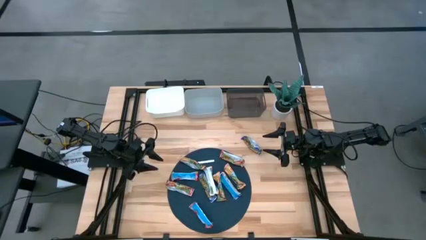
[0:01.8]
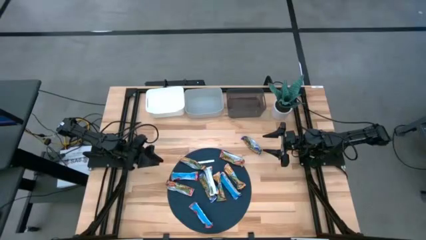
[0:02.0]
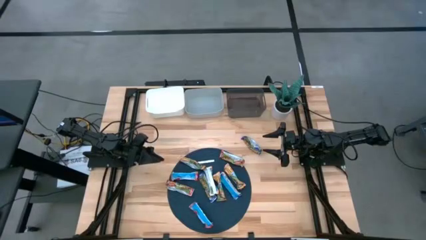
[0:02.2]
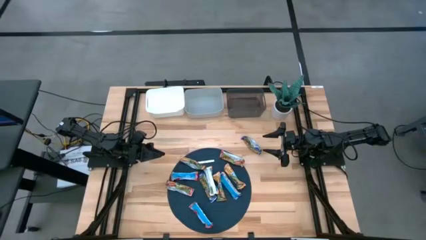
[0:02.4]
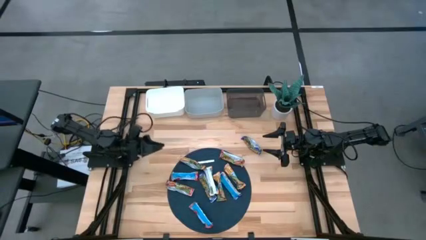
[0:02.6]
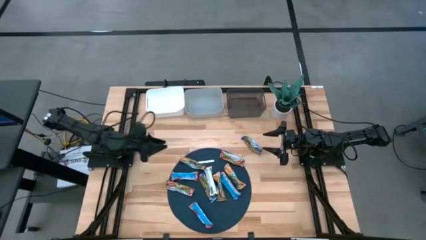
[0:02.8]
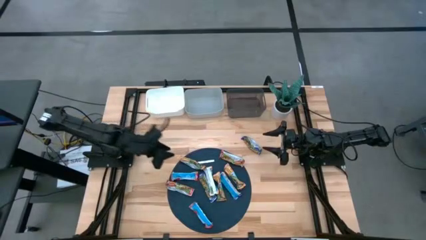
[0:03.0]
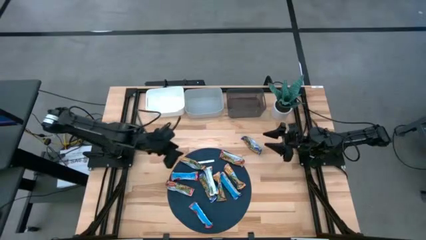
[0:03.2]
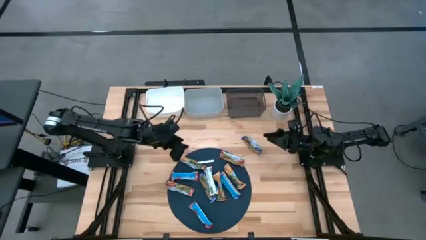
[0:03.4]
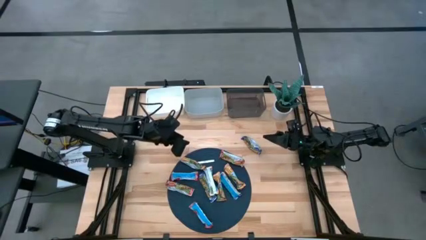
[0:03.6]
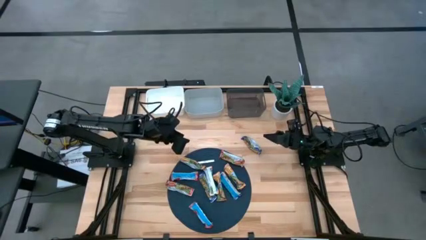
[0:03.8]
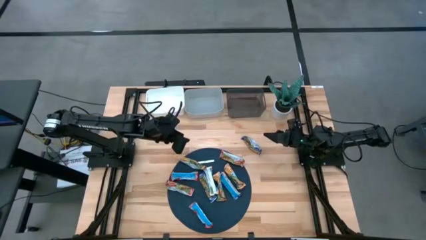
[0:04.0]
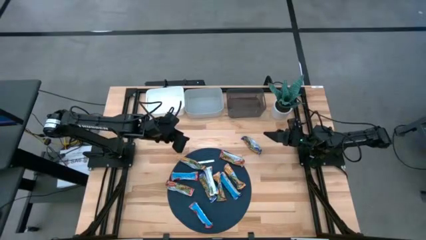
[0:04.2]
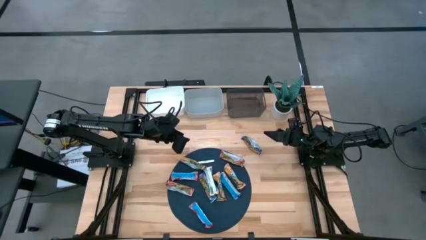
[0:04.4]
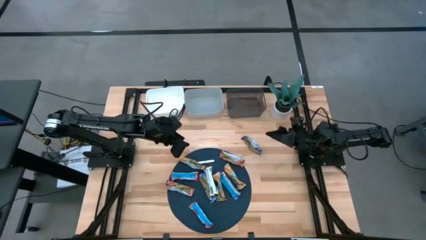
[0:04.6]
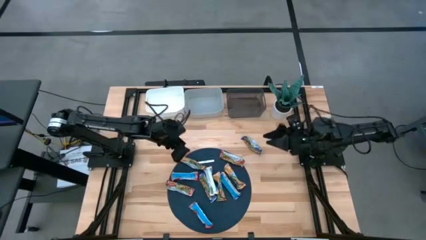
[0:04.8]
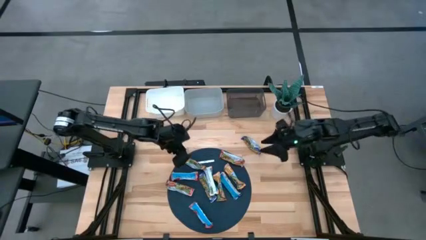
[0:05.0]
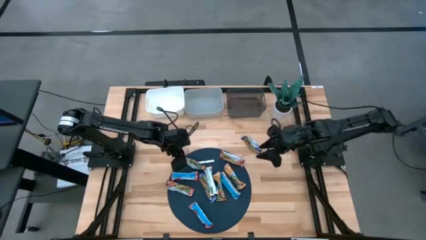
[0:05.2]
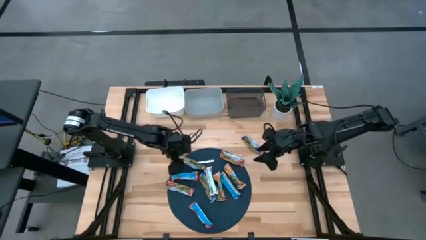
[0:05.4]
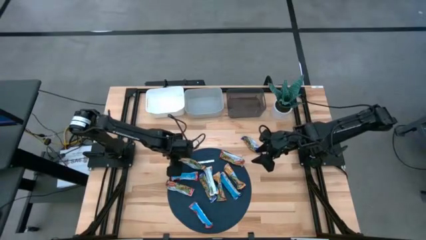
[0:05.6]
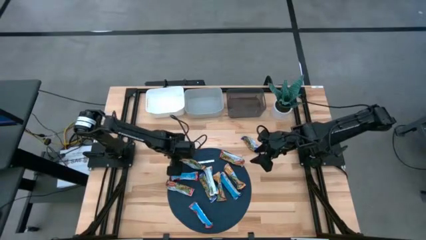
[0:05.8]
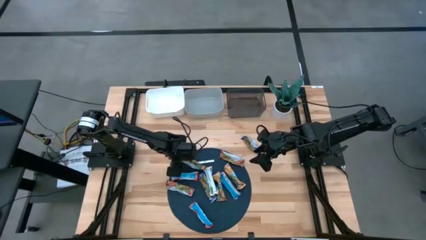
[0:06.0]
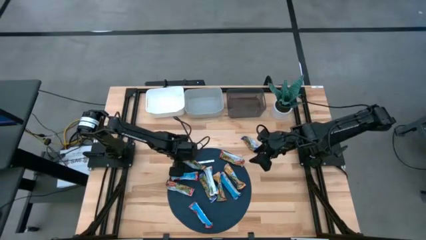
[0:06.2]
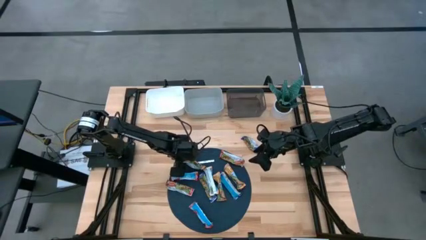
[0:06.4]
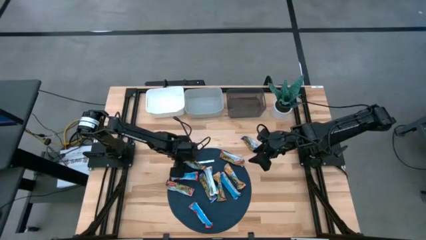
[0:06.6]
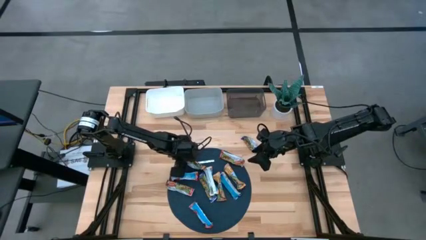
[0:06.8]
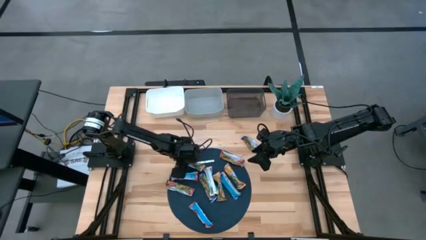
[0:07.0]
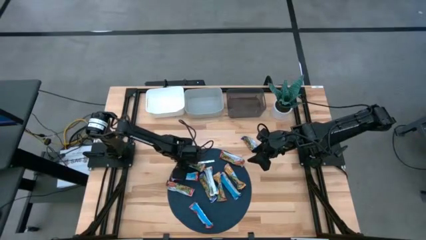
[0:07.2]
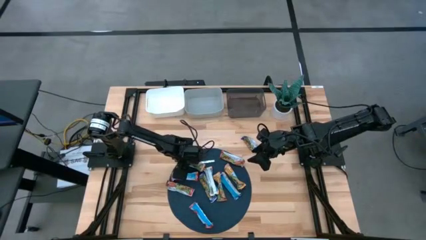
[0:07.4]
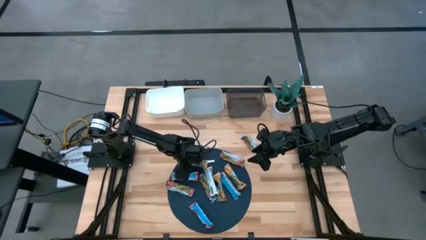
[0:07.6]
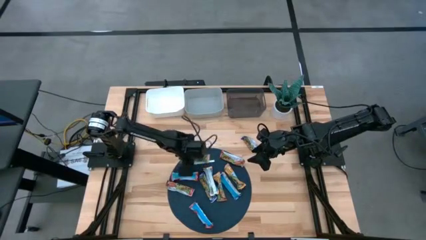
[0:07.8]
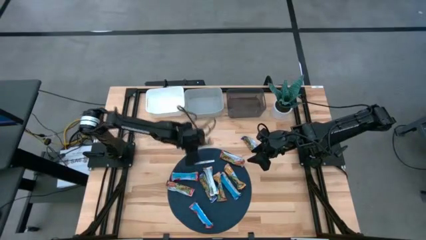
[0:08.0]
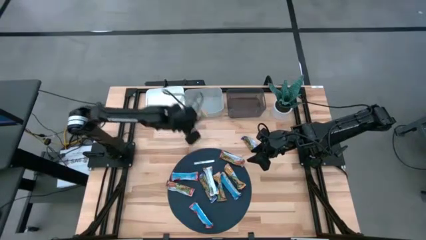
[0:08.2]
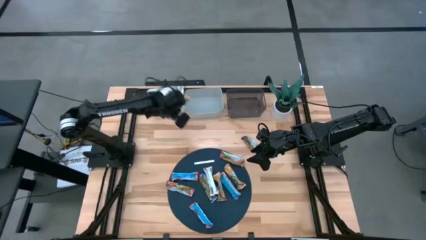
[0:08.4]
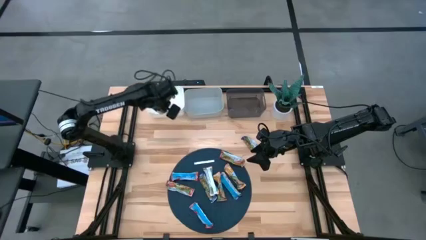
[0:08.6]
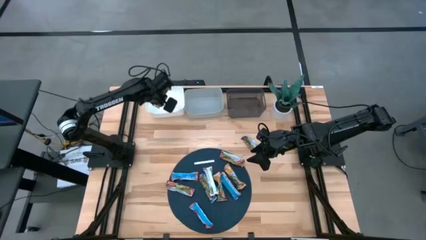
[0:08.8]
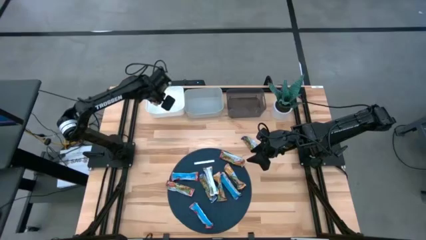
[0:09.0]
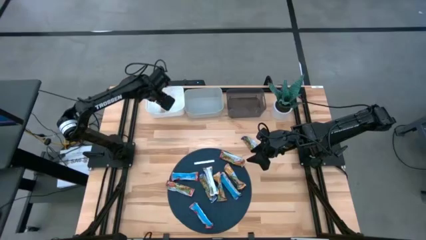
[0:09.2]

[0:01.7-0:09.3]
Task: Pick and place Granola Bars by type
Put the orange granola bar into the white bin

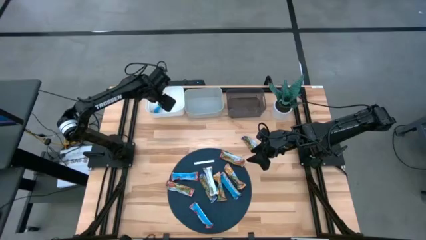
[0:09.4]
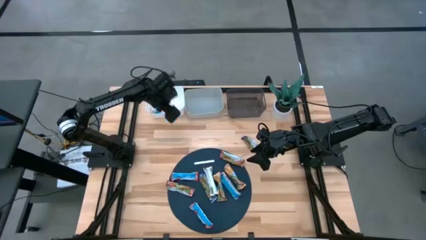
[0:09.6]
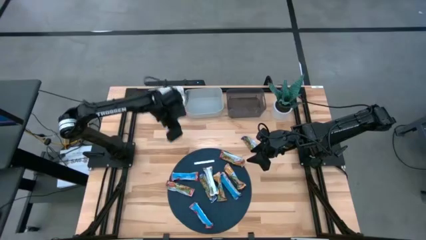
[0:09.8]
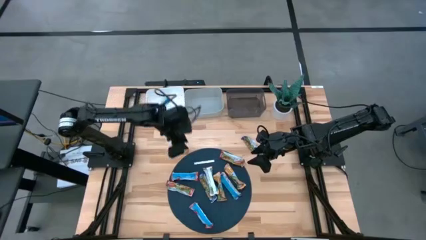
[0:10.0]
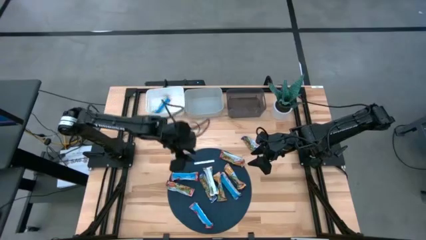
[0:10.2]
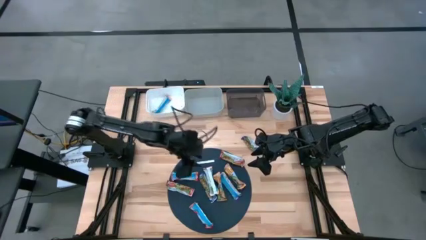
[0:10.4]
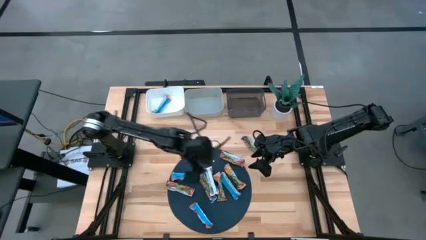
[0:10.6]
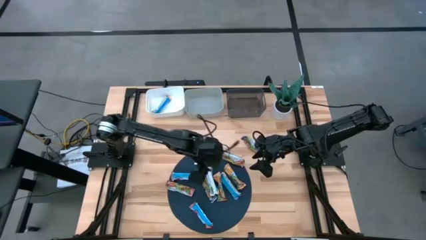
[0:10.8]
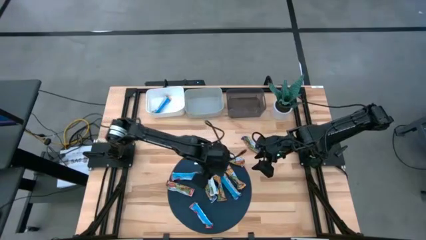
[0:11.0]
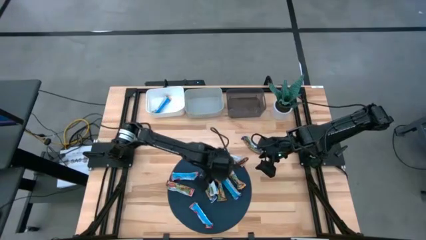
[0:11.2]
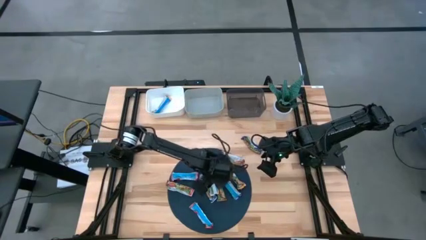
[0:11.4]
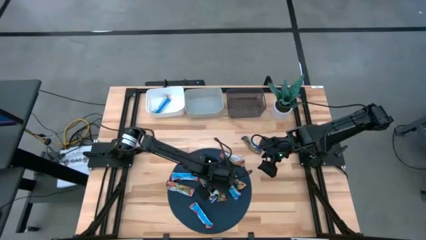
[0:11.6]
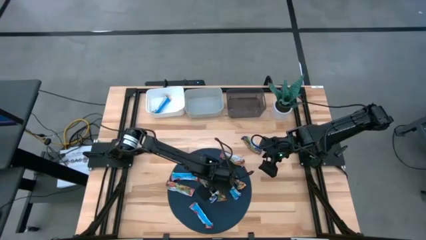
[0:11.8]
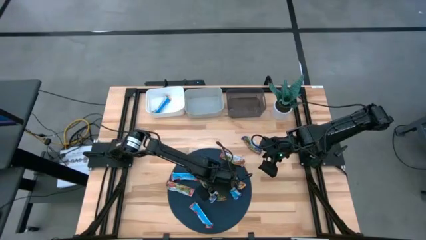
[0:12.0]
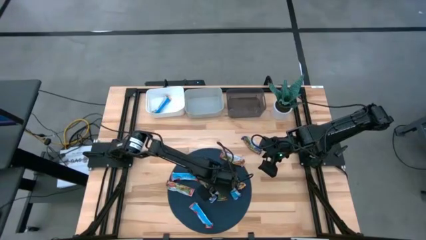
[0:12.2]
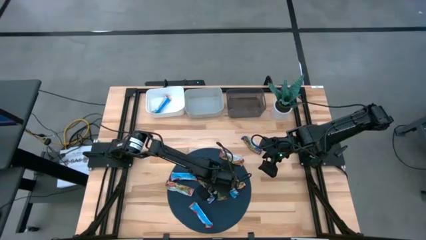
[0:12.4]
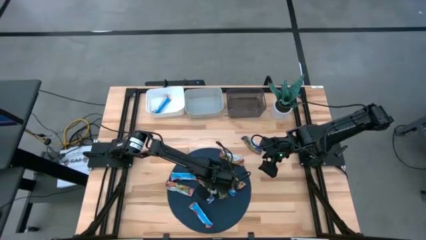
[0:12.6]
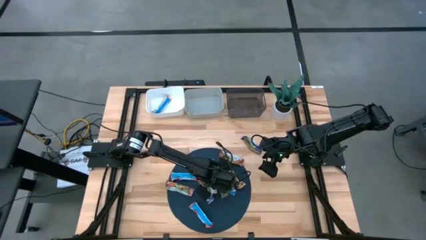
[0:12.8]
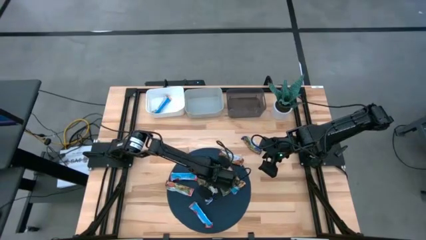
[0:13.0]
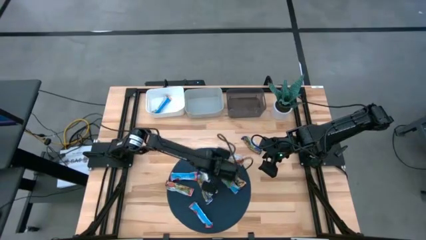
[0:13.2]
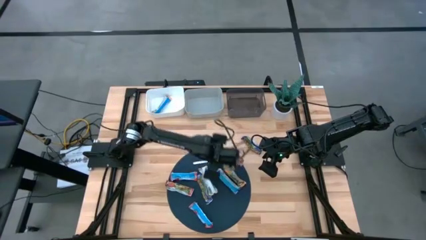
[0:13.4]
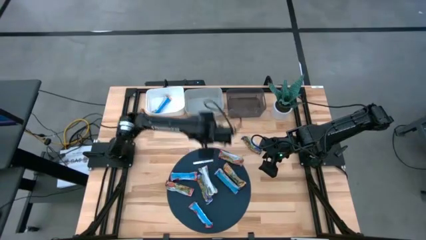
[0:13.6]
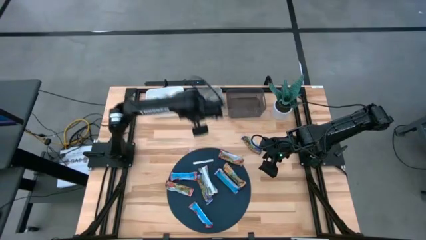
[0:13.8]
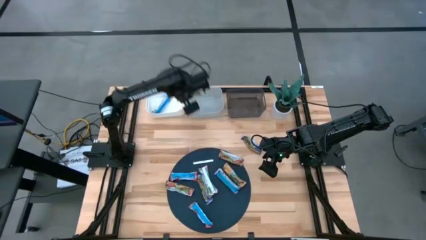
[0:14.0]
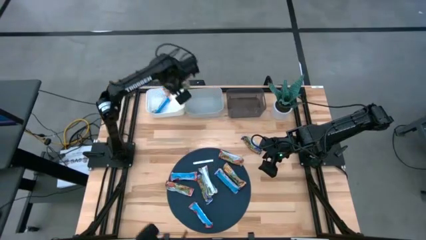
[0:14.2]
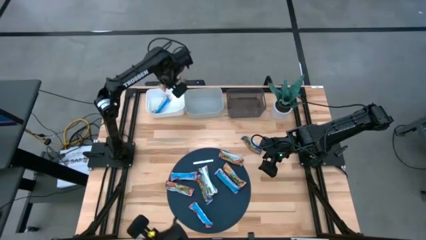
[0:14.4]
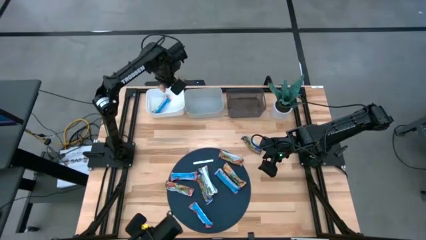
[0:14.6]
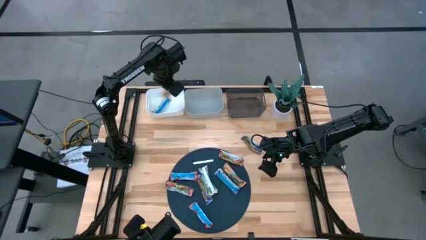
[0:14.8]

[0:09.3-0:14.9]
Put the orange granola bar into the white bin

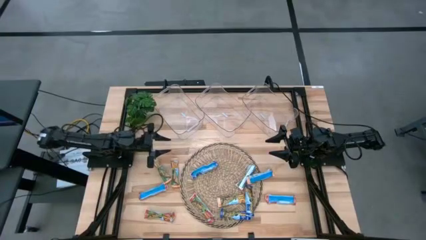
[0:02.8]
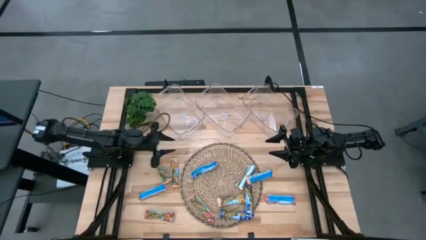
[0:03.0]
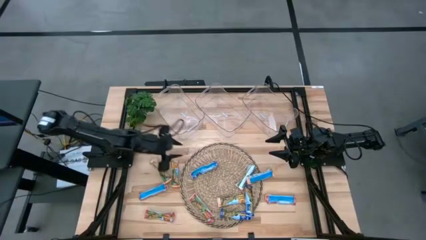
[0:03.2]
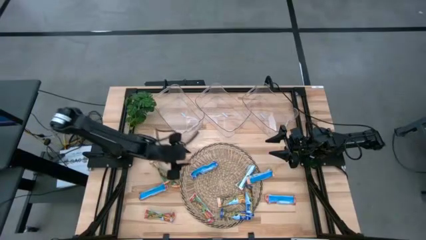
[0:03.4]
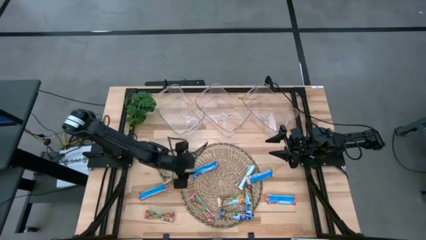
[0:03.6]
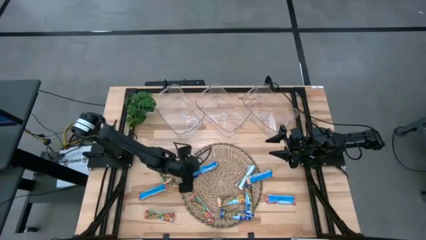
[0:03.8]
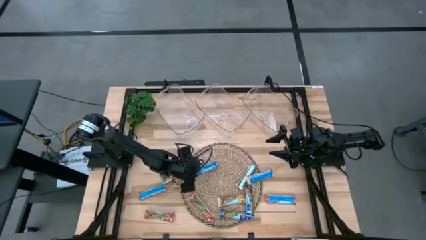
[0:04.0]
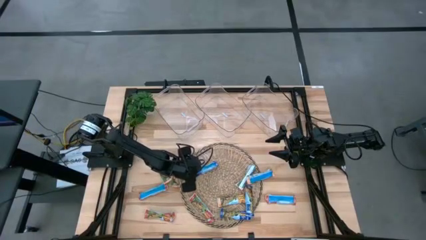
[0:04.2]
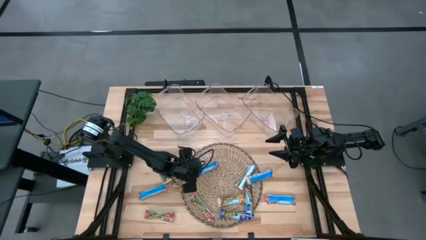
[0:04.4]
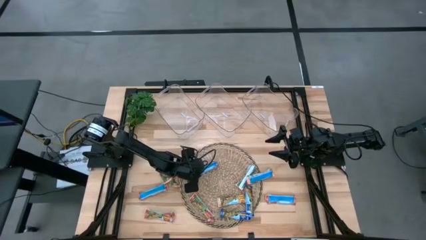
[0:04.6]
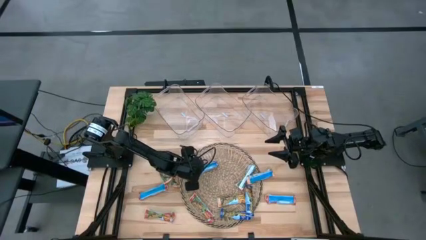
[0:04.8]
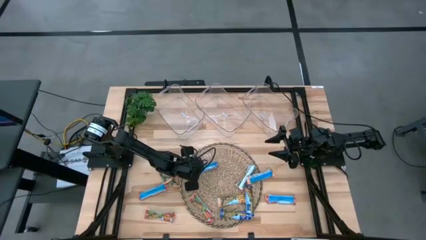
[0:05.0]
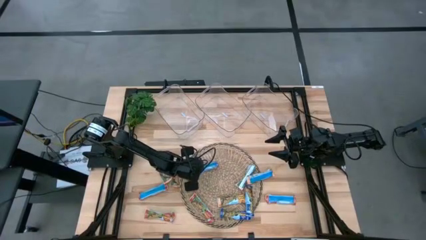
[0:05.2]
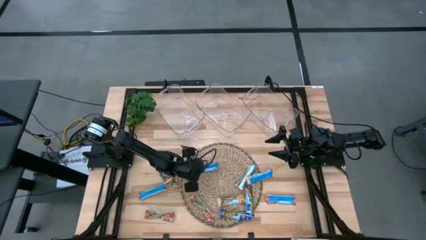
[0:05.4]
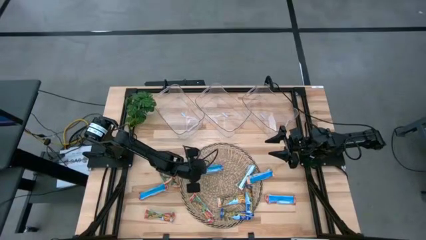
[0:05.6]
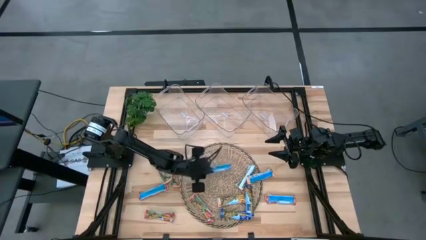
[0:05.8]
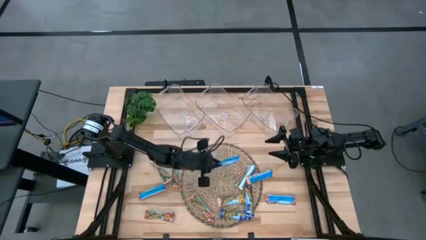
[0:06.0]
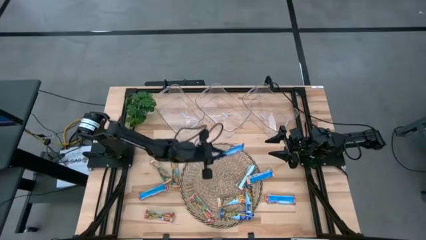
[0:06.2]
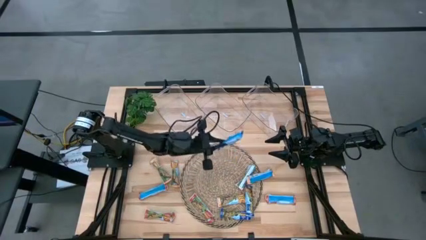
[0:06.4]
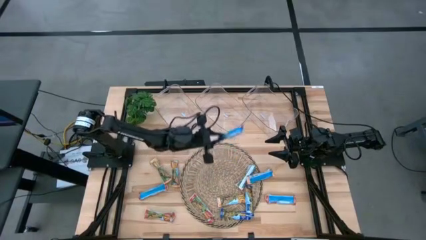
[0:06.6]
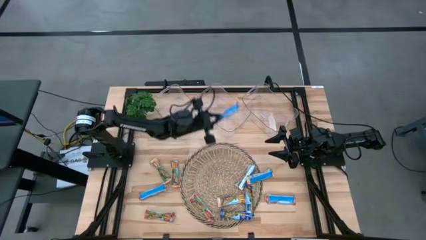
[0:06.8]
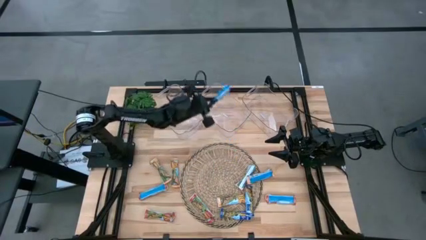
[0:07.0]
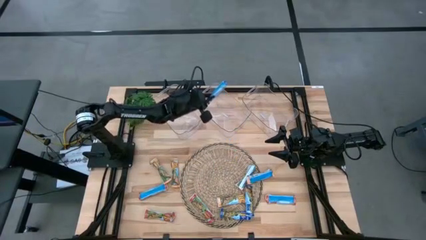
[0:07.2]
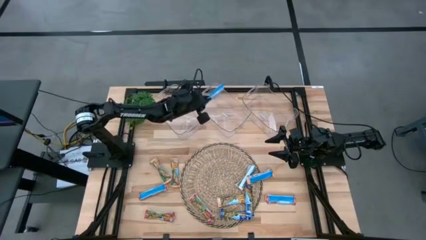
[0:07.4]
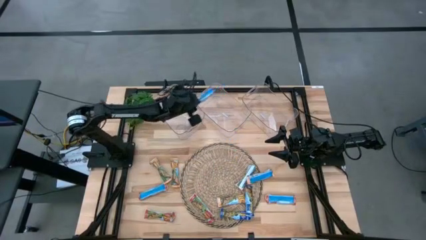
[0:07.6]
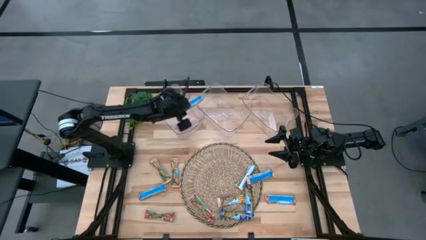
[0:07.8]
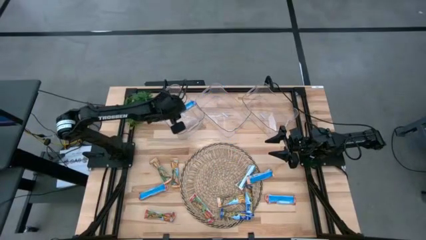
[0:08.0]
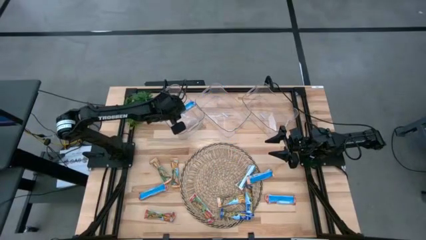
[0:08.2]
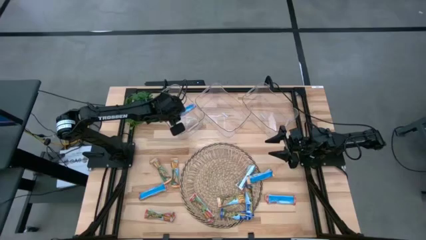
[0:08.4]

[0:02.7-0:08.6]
Task: Pick and place Granola Bars by type
Put the blue granola bar into the left transparent bin
